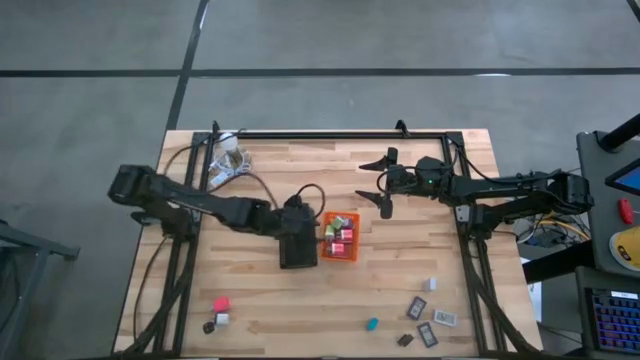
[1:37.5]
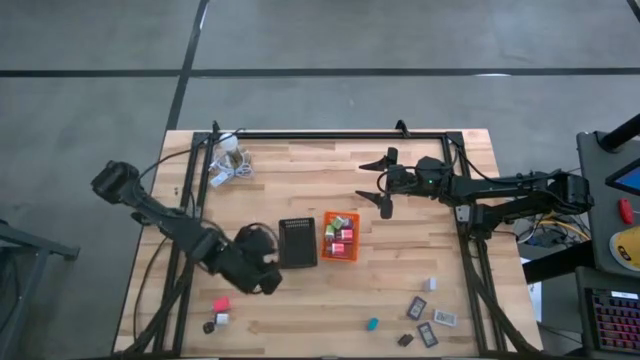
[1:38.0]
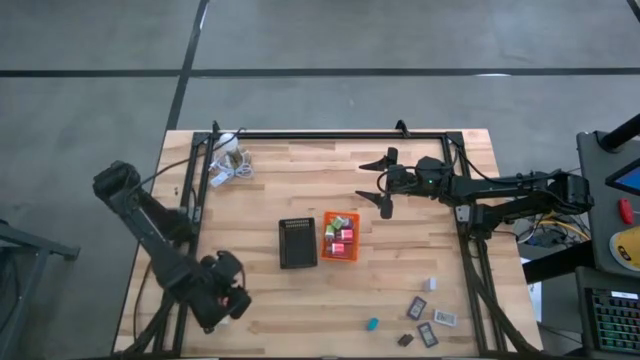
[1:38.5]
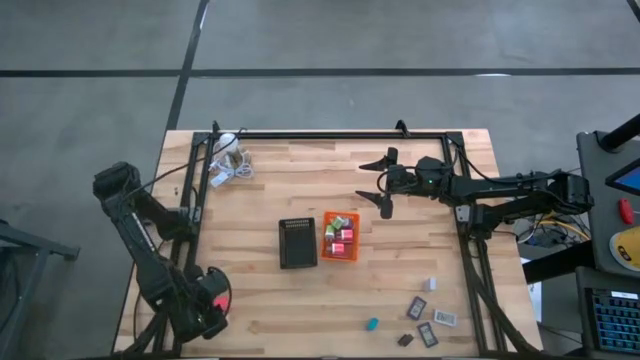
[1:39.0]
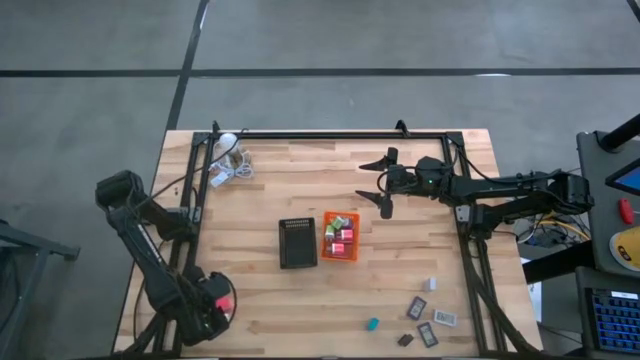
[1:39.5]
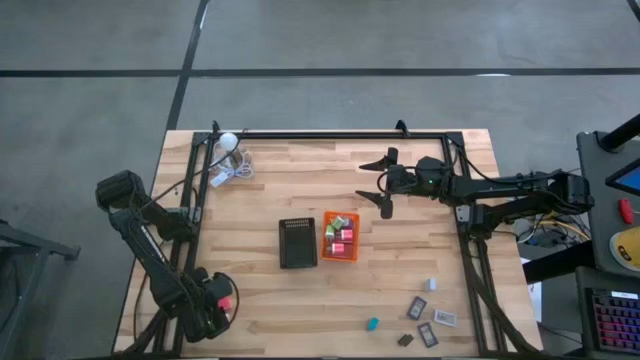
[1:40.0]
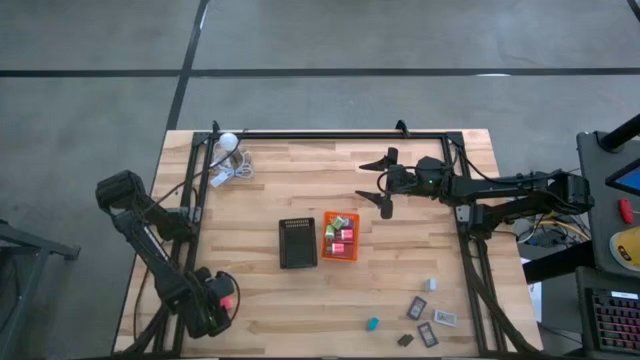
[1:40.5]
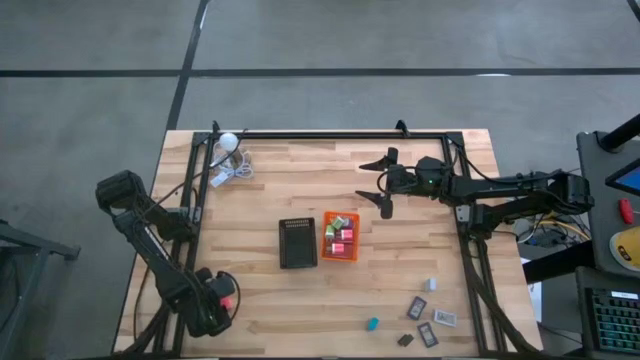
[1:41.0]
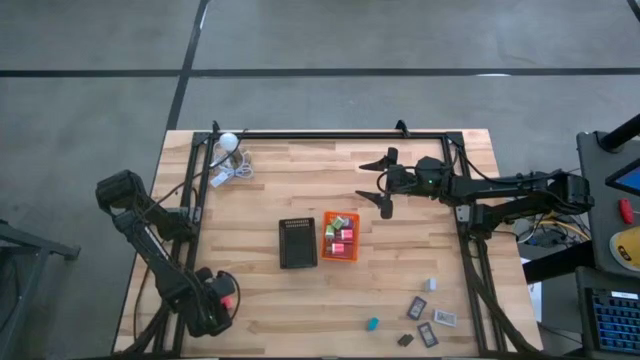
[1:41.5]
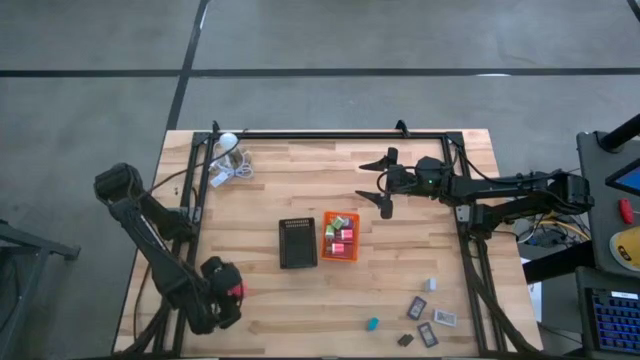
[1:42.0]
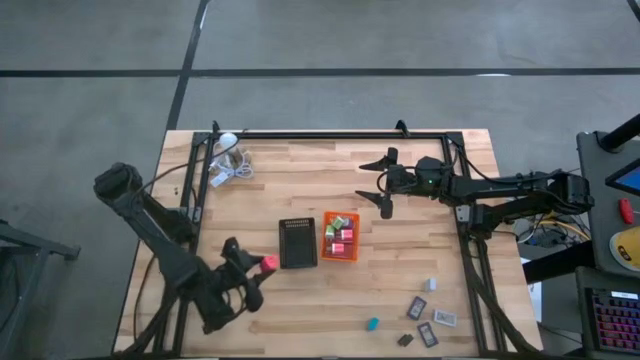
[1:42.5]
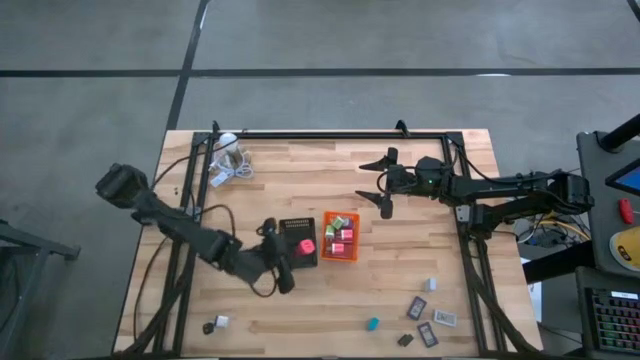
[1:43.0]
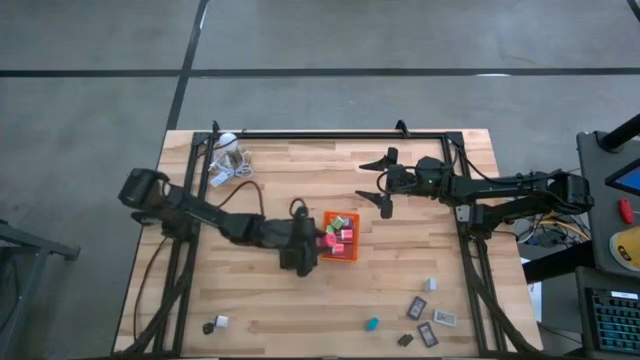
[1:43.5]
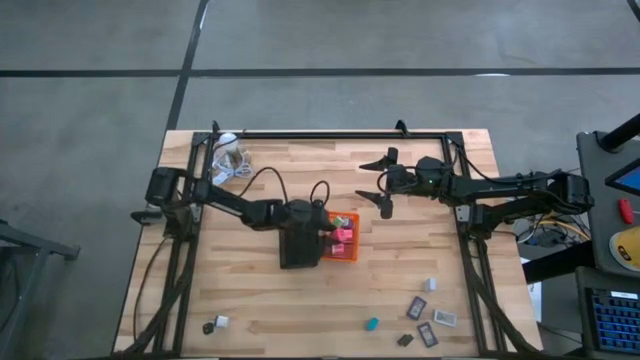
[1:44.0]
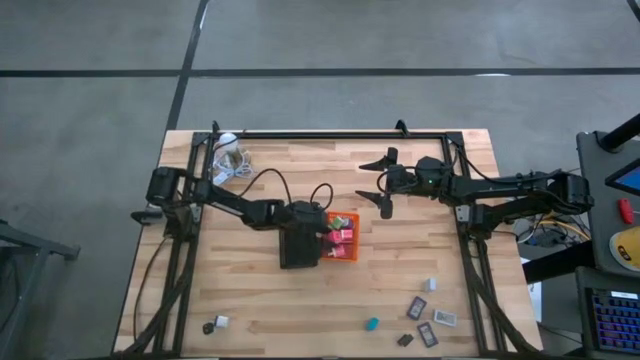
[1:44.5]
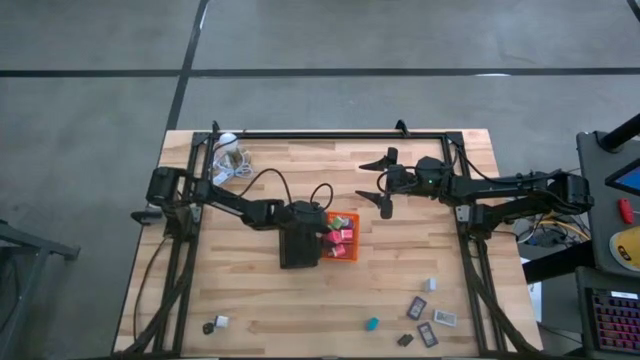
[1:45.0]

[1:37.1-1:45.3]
Task: Pick & Place Office items
Put the pink charger adapter into the orange bin

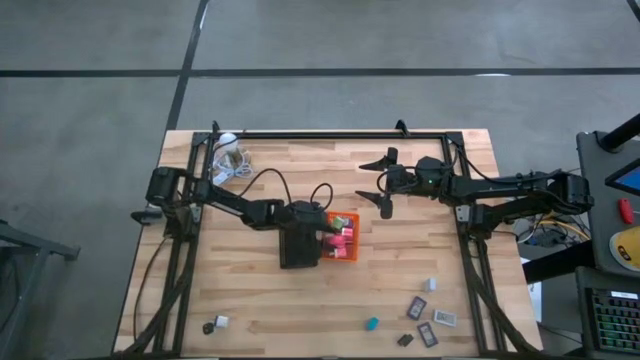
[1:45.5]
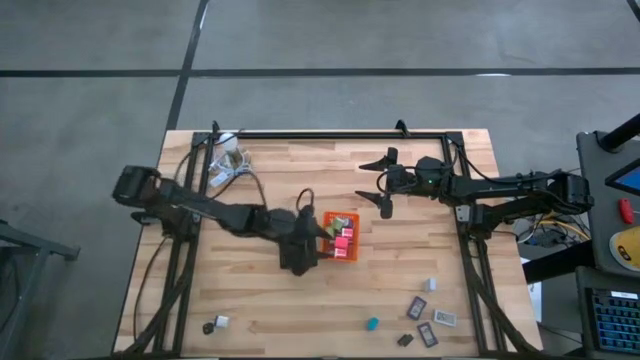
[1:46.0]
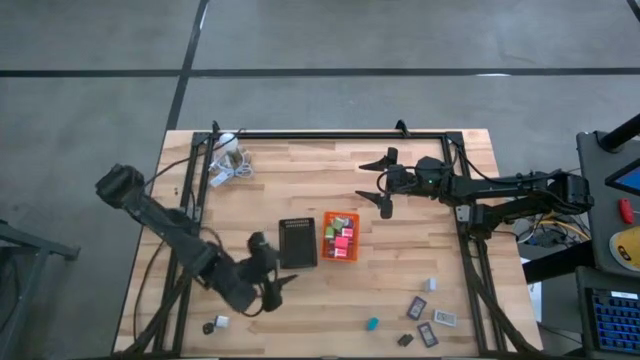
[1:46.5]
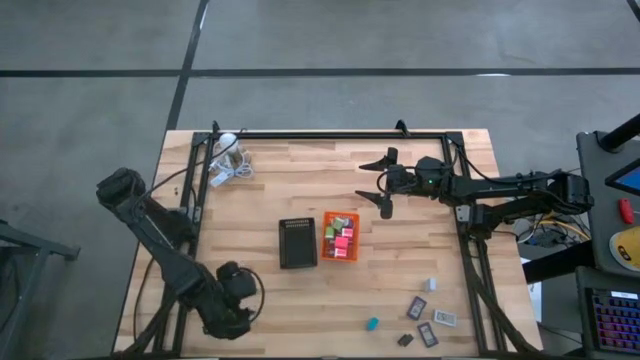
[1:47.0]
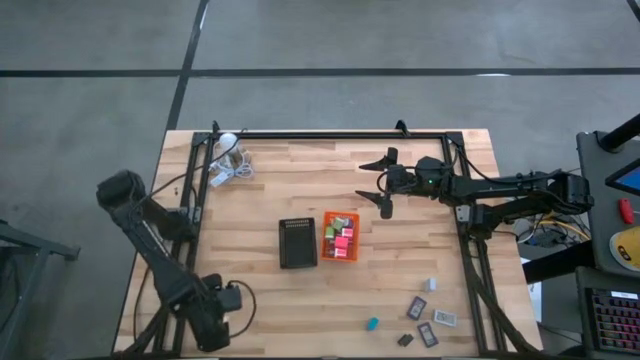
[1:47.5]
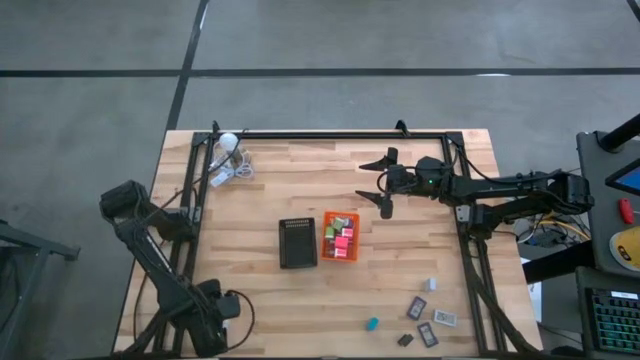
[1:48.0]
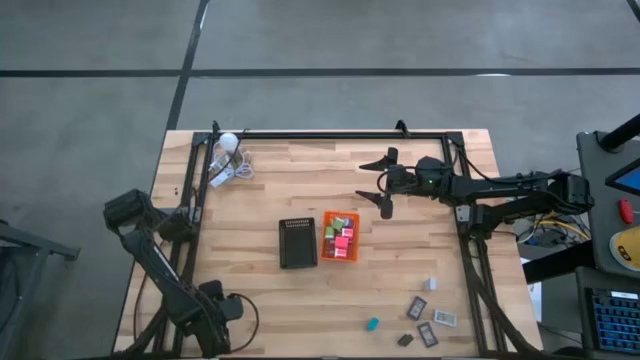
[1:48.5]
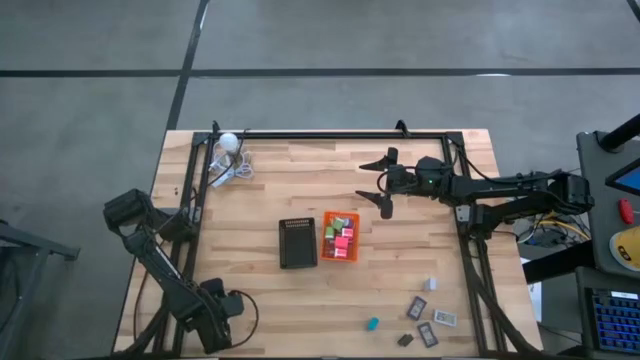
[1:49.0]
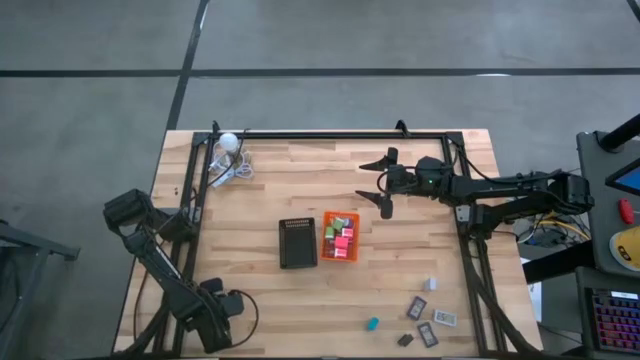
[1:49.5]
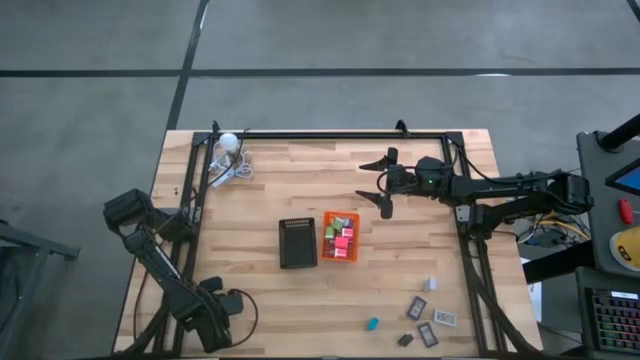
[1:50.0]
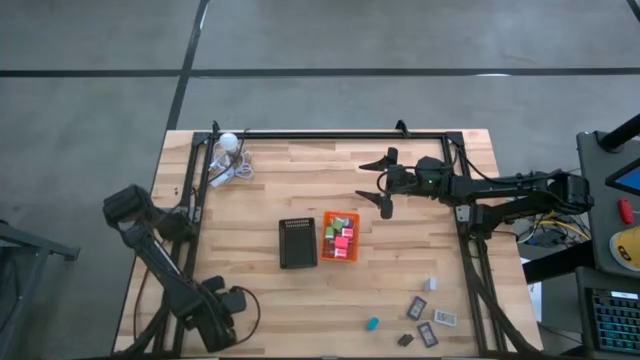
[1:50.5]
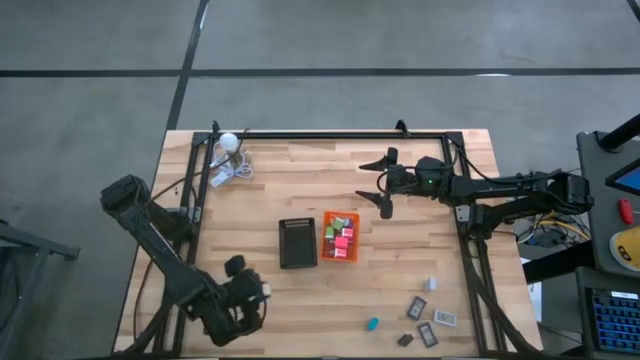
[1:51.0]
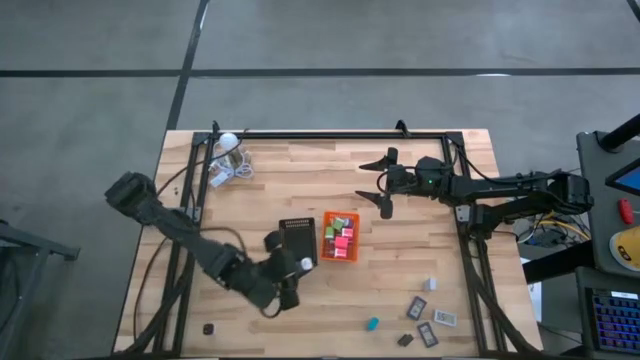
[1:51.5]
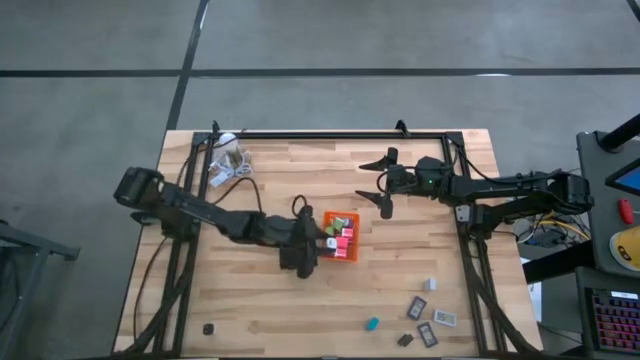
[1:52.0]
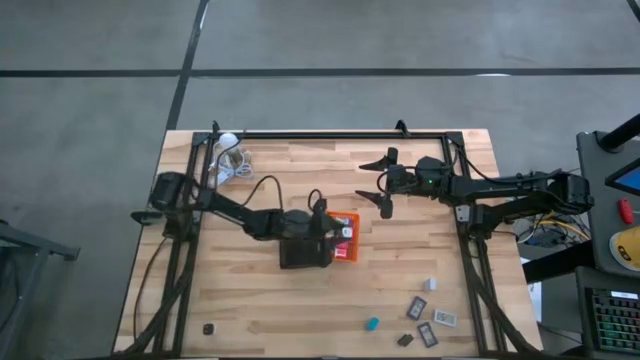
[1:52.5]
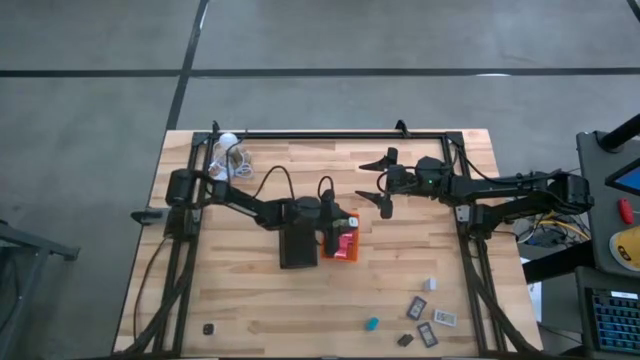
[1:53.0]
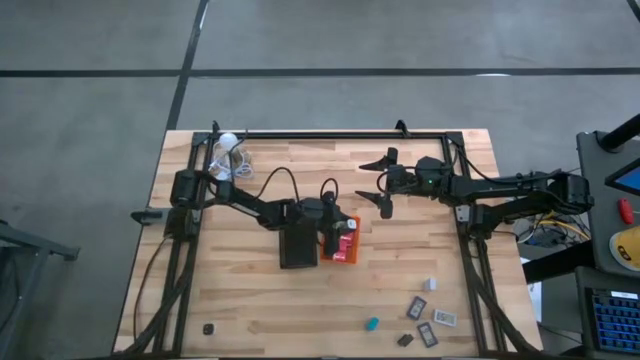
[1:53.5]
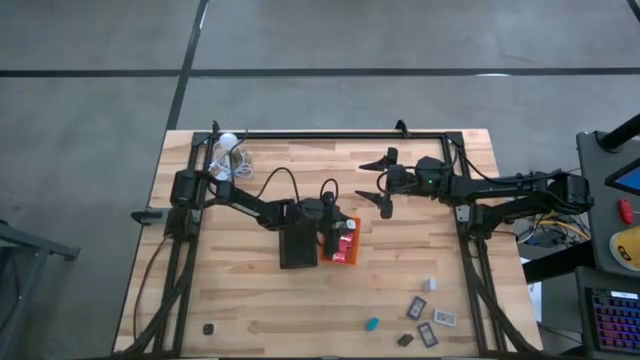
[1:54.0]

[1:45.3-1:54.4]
Put the right white charger adapter into the orange bin

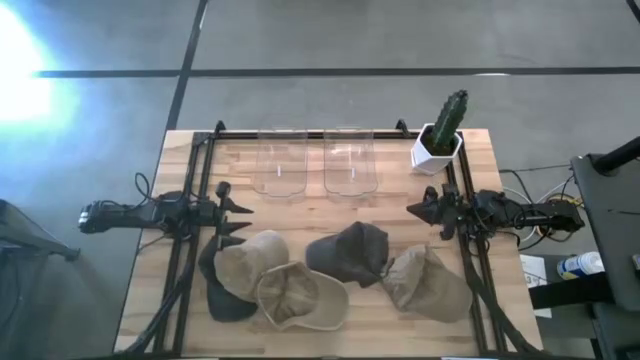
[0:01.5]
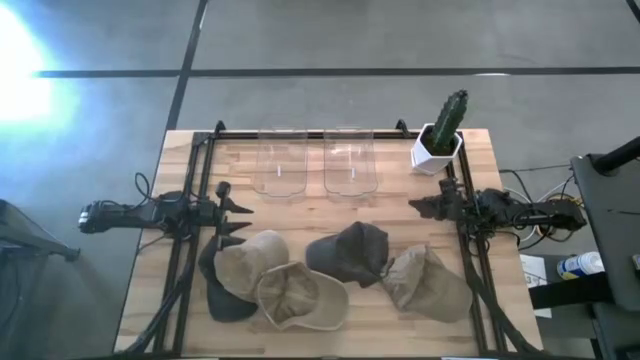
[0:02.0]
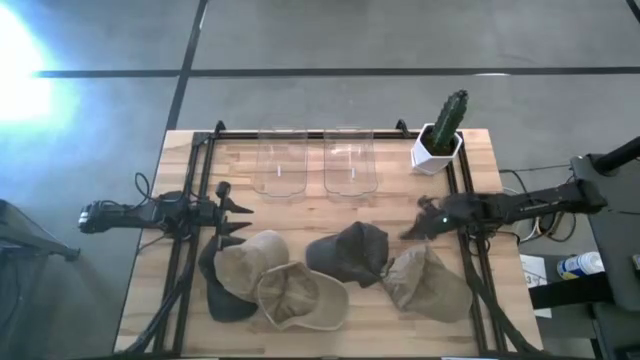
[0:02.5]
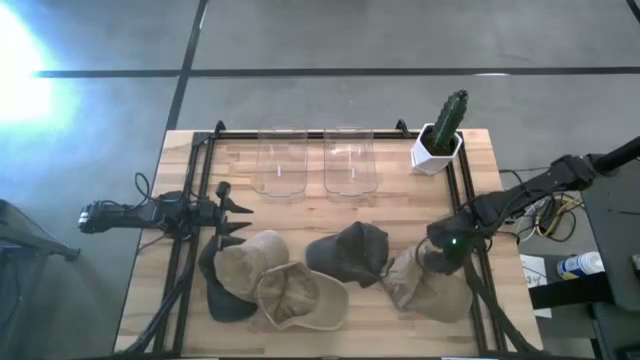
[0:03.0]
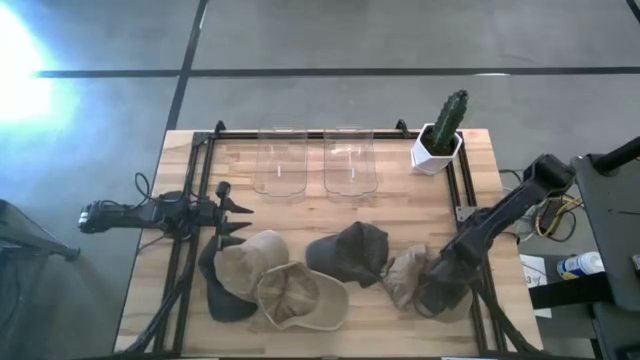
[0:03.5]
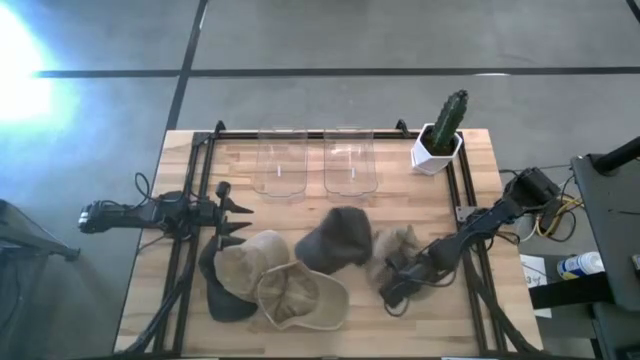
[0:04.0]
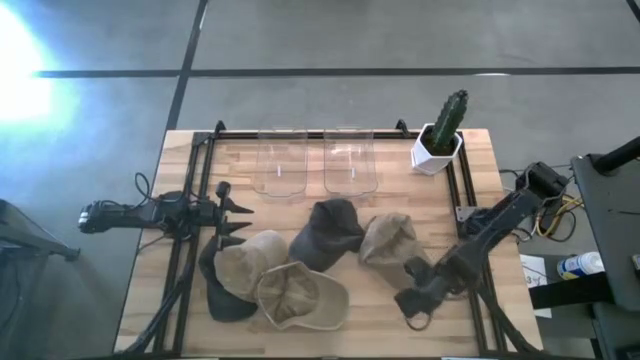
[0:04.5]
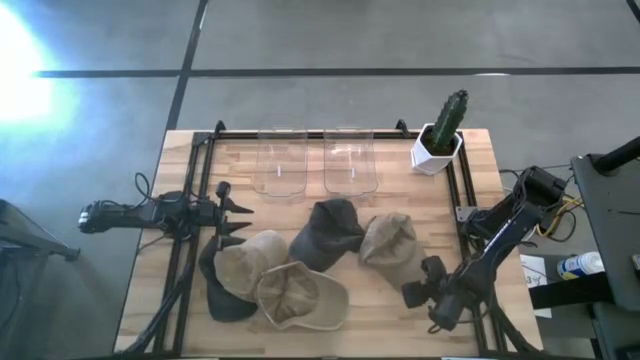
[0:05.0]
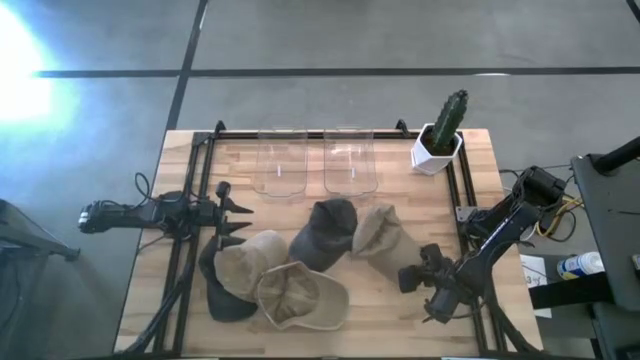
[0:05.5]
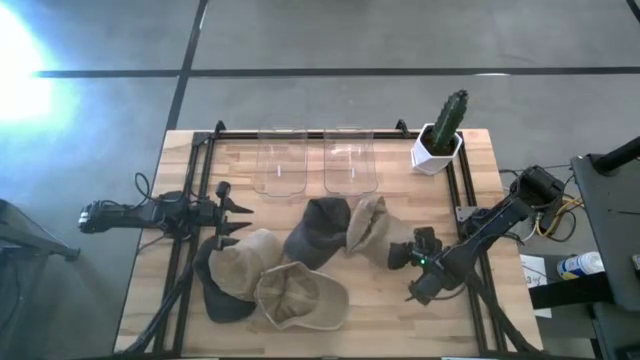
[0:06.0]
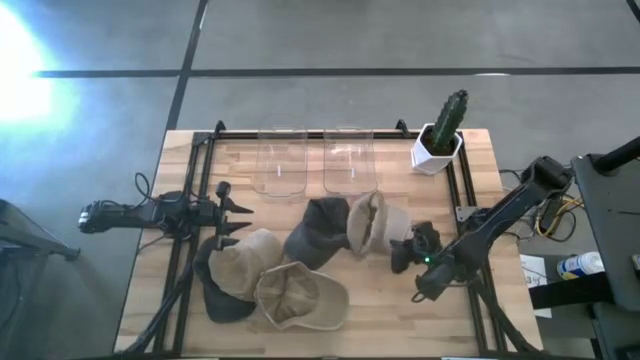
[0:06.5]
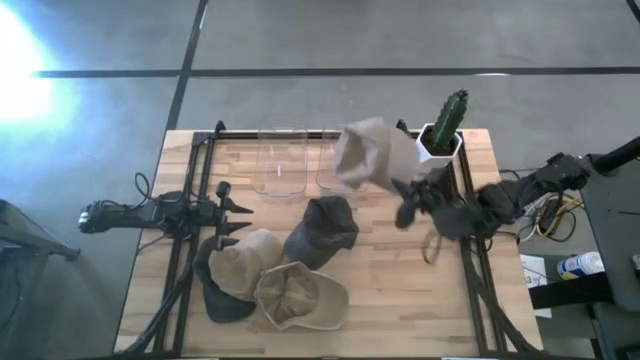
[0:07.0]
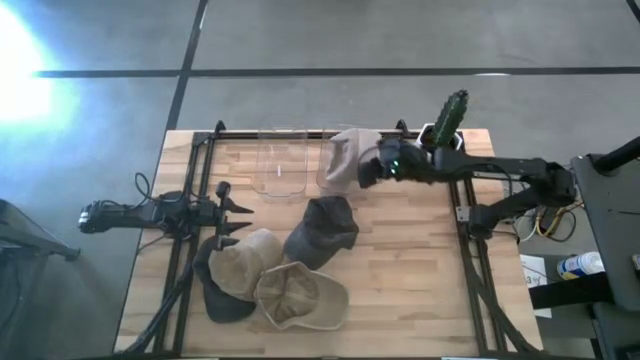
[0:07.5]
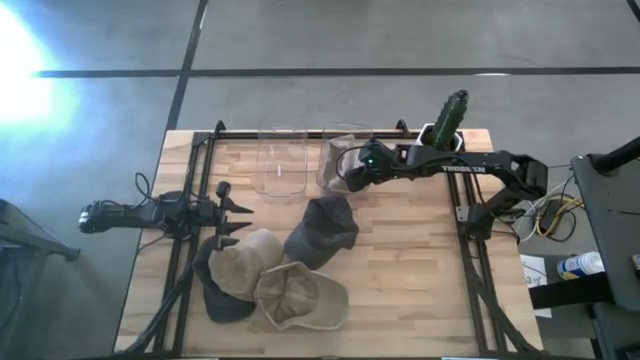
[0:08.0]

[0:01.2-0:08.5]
Task: Pick & Place hat
Put the top right brown cap into the right transparent bin
